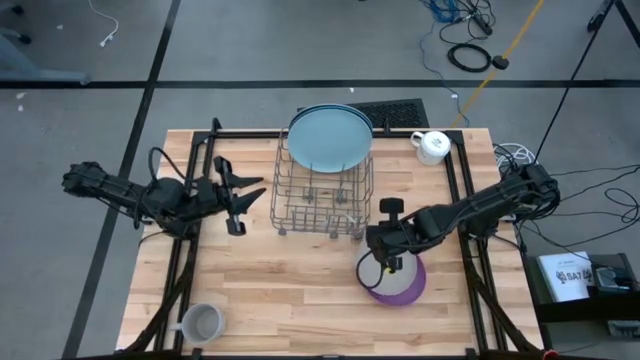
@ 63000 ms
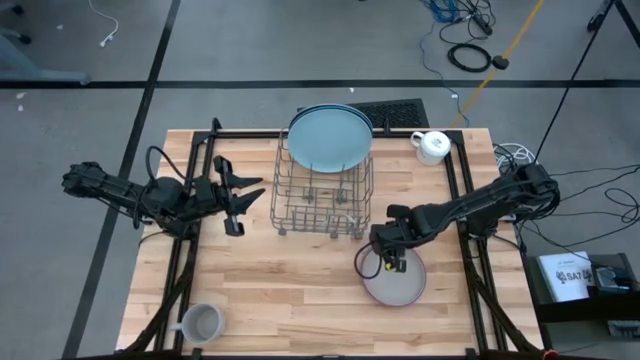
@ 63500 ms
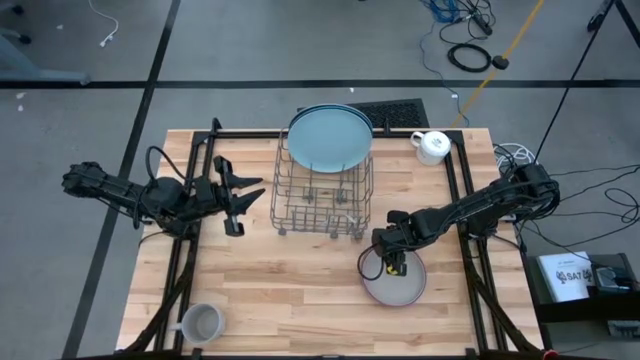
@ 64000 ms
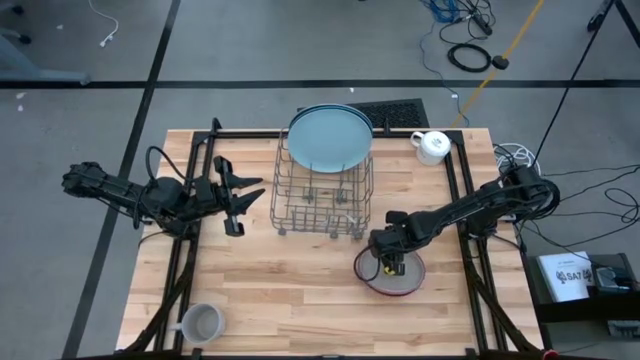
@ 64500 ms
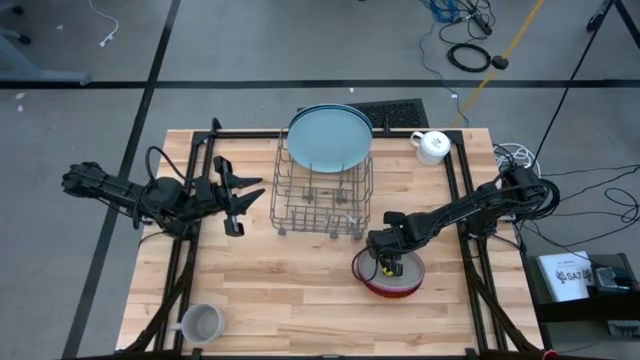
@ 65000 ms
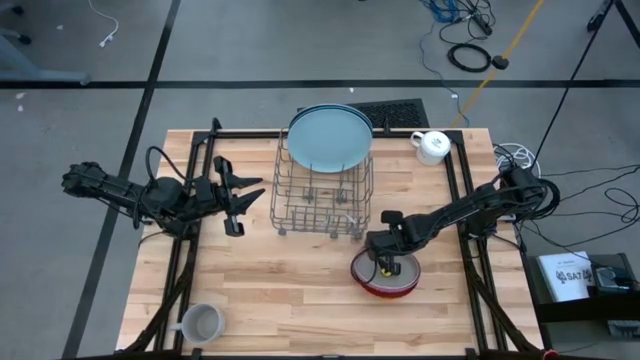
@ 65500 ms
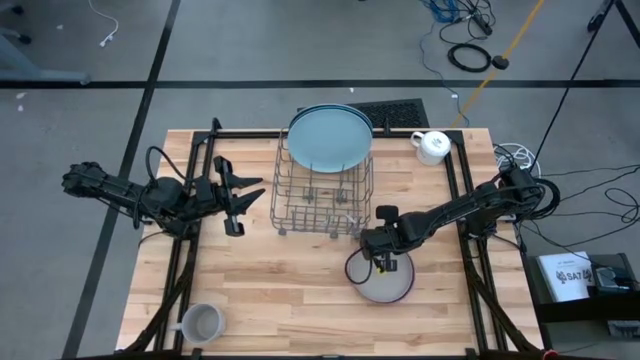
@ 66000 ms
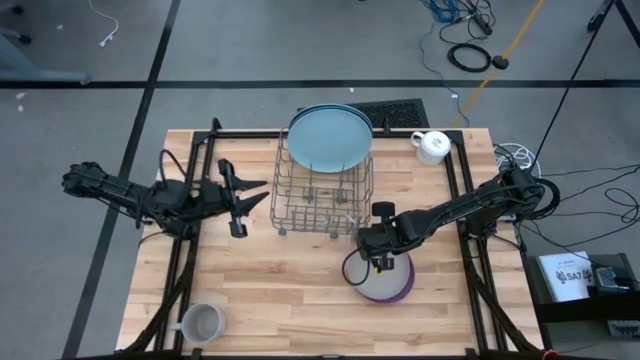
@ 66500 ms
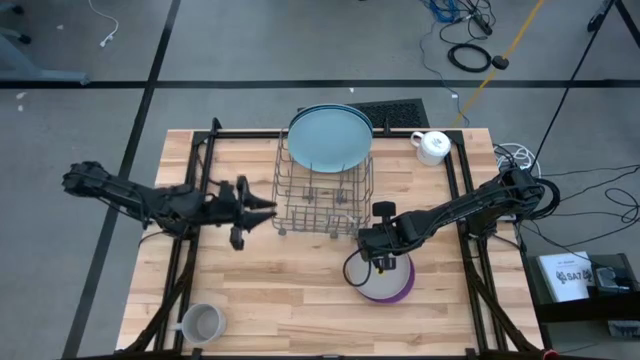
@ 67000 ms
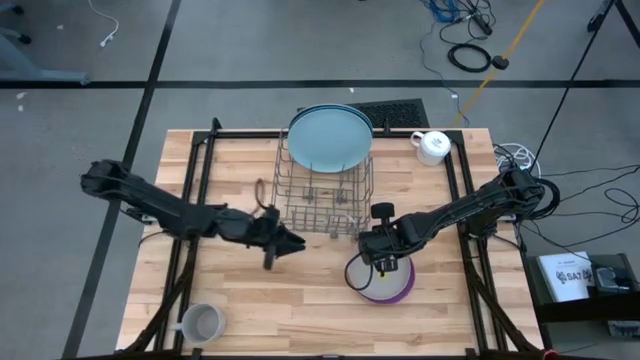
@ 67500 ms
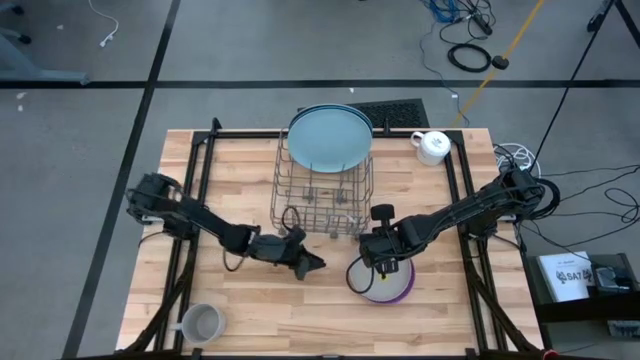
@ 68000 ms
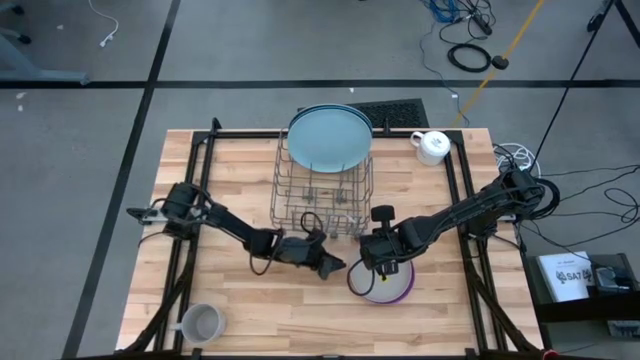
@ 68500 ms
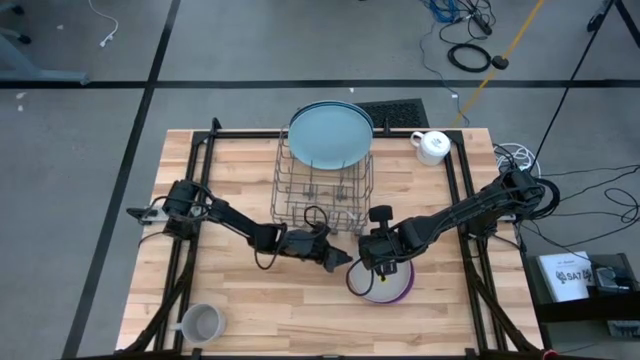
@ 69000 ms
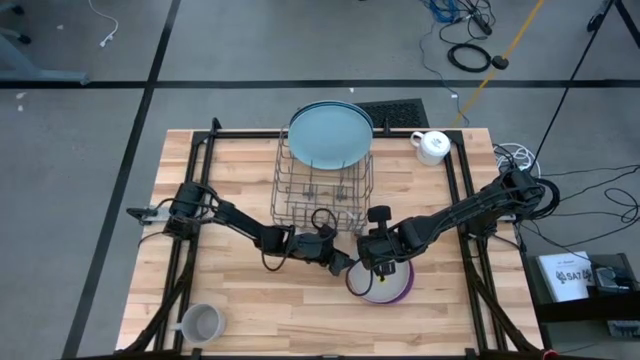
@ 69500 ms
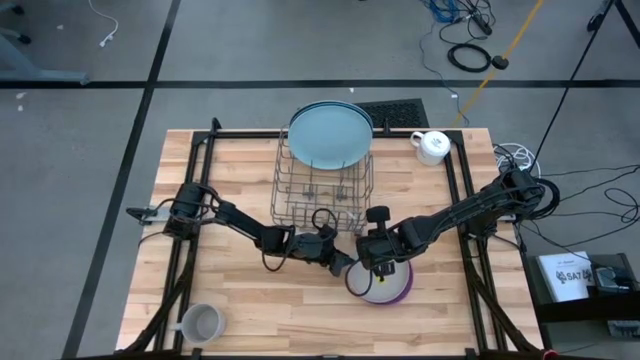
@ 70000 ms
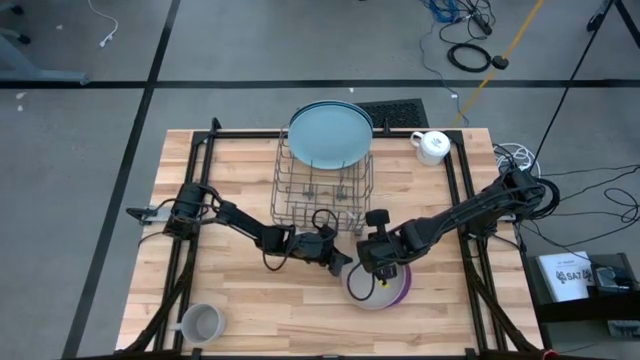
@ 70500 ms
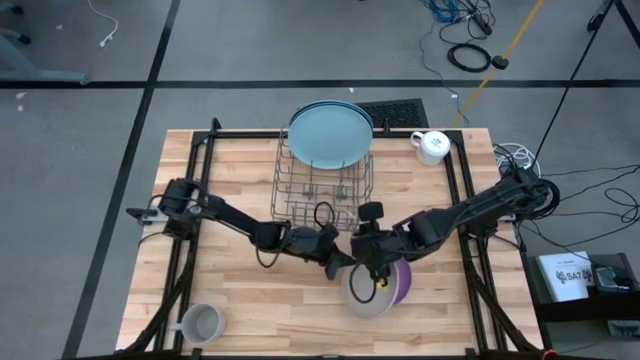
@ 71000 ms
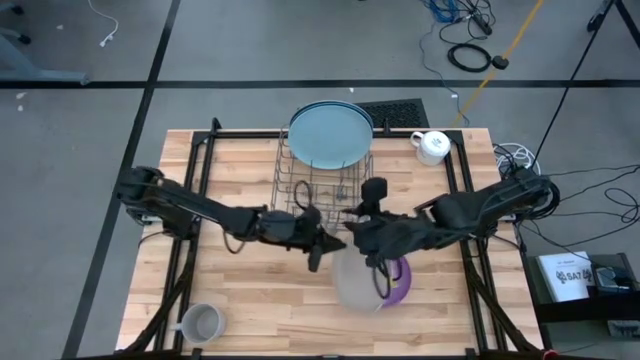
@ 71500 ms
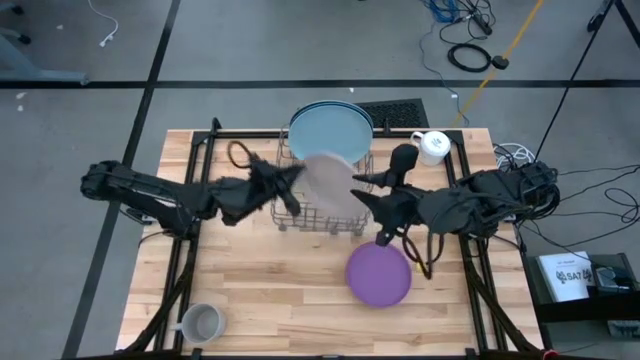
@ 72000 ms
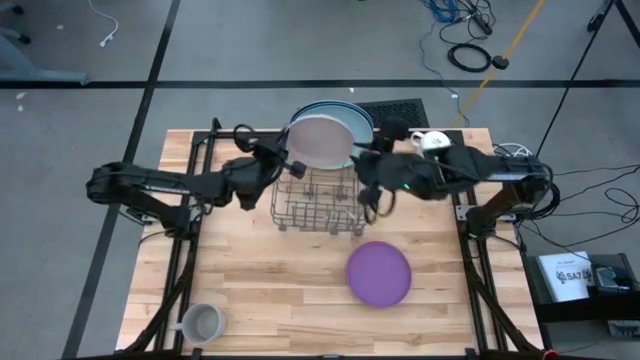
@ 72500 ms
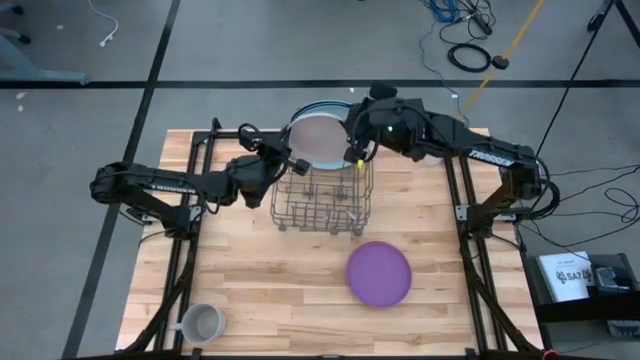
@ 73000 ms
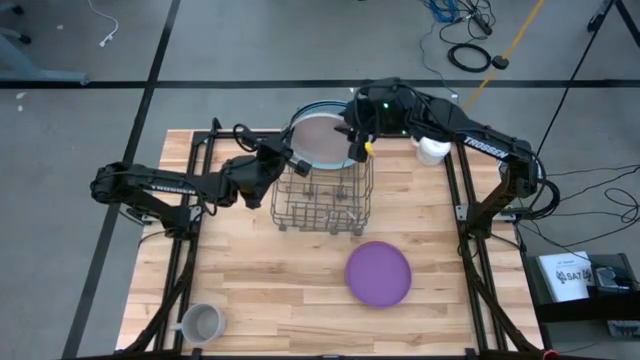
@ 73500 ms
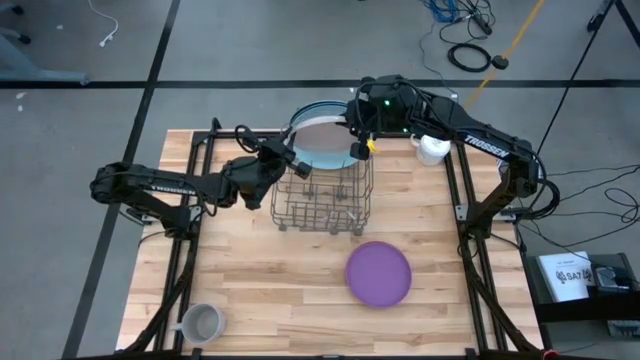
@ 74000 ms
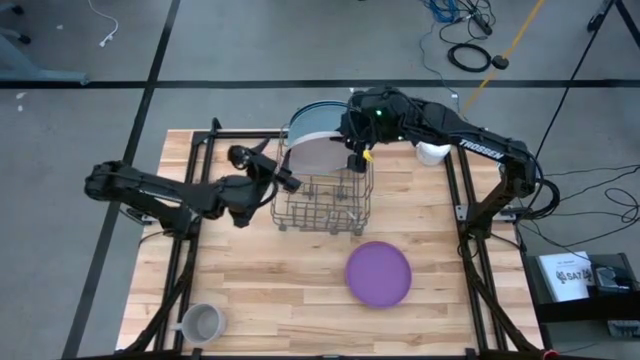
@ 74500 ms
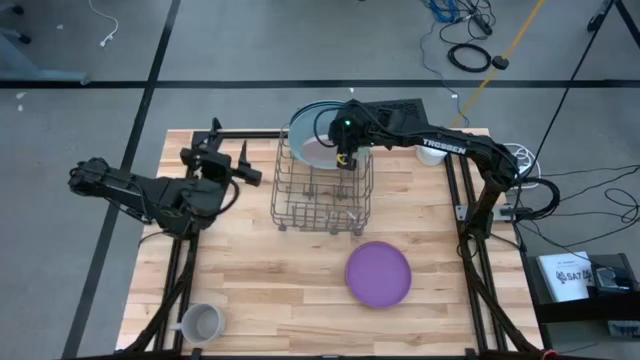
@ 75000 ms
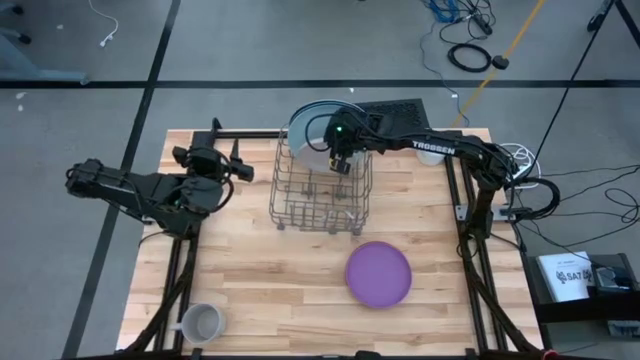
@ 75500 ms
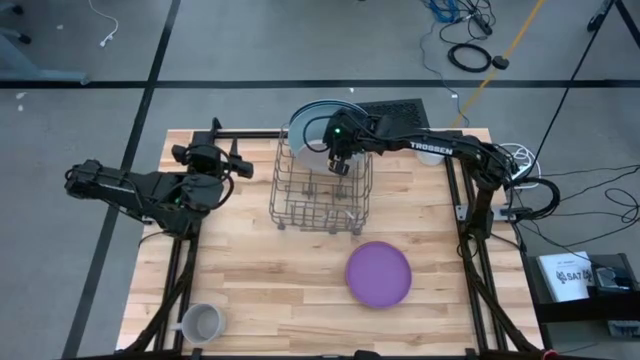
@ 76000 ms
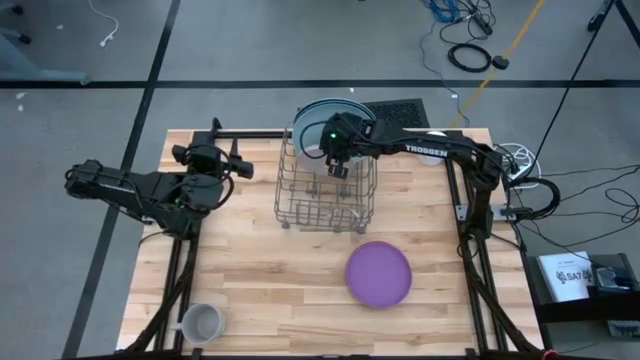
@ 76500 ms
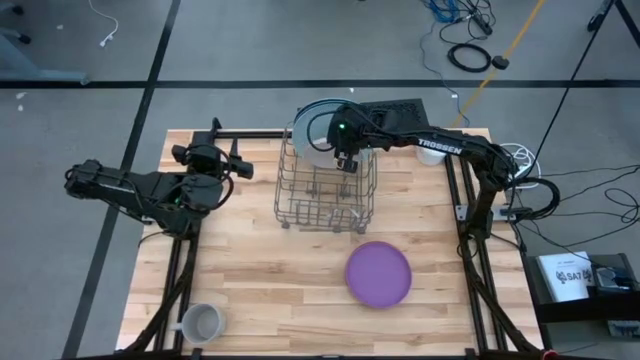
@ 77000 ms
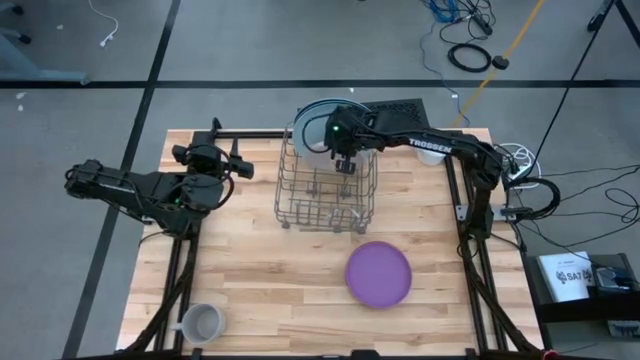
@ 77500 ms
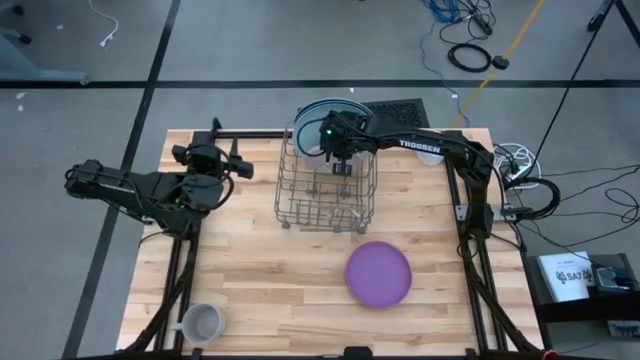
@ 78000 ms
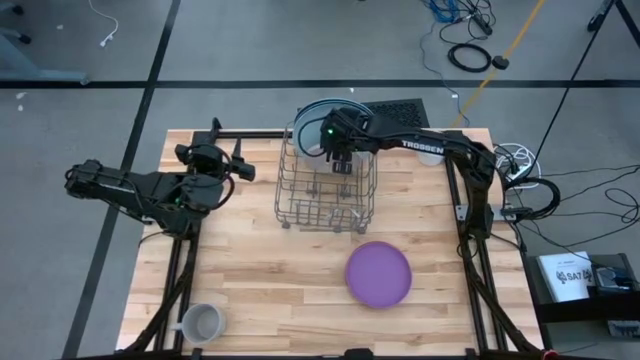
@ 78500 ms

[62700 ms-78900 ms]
Task: Sort dishes
Put the small gray plate into the dish rack

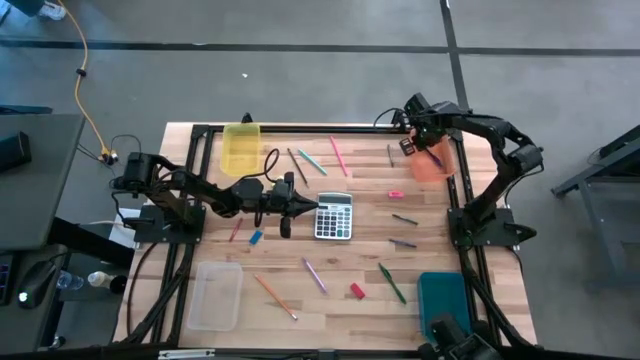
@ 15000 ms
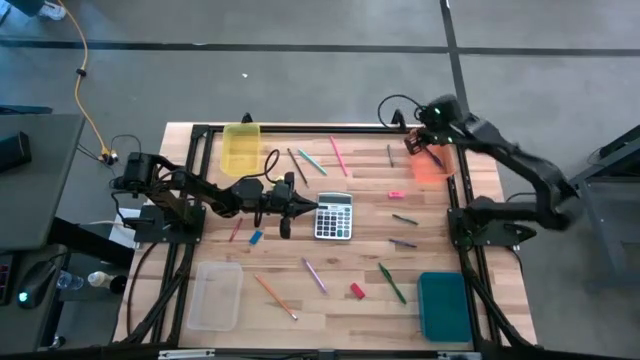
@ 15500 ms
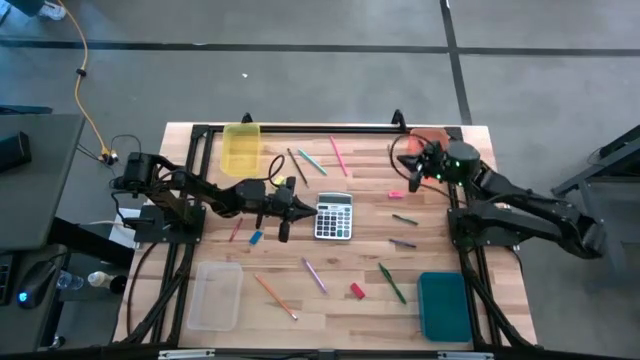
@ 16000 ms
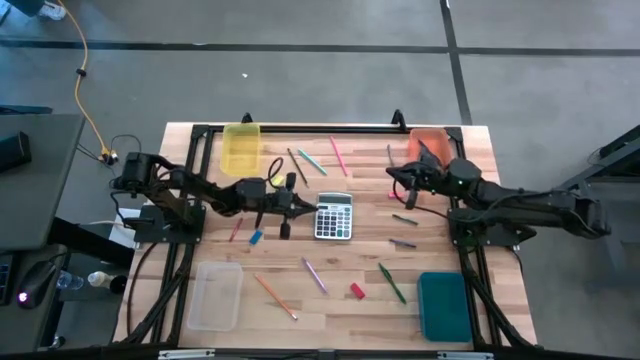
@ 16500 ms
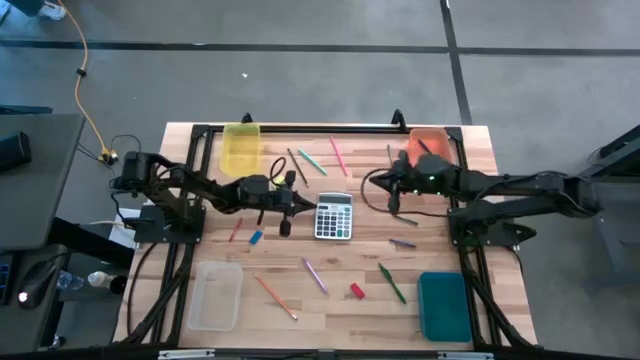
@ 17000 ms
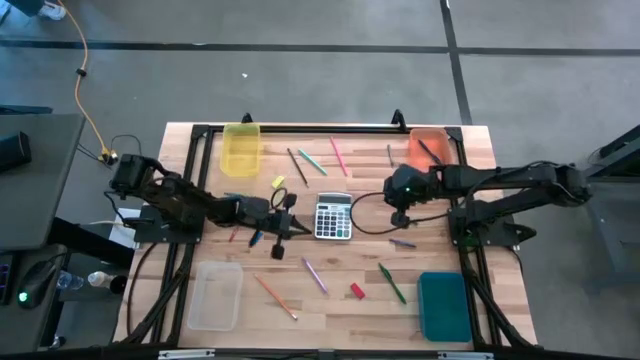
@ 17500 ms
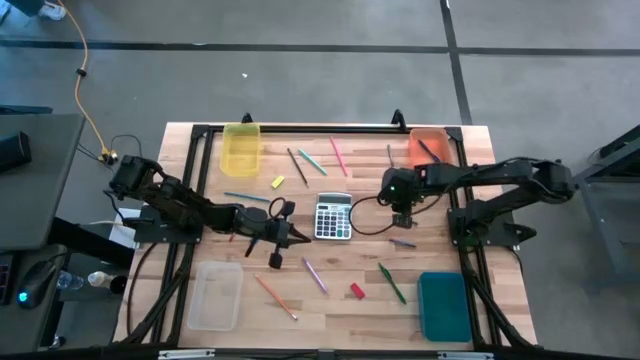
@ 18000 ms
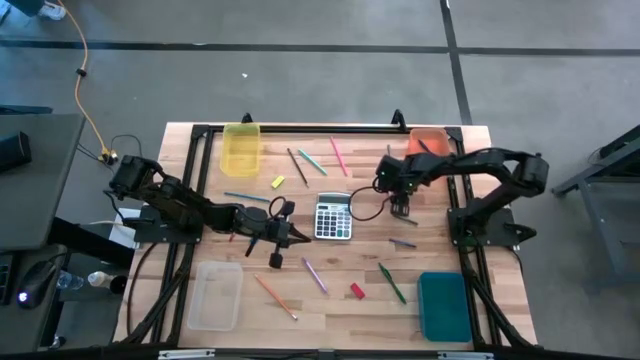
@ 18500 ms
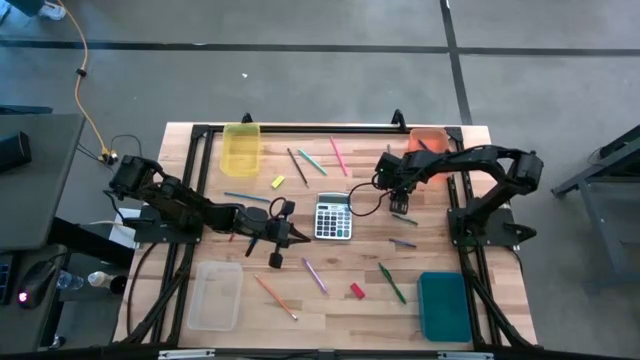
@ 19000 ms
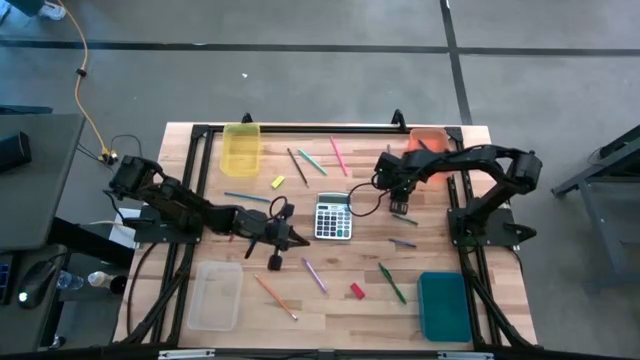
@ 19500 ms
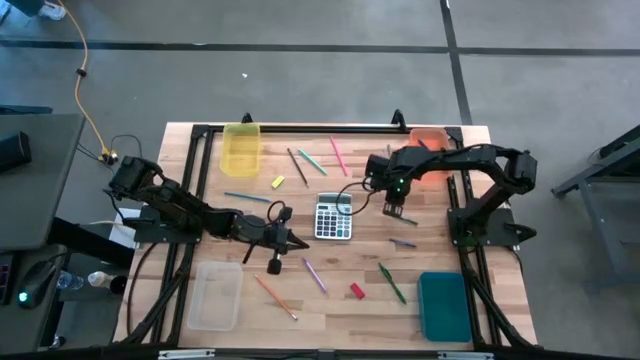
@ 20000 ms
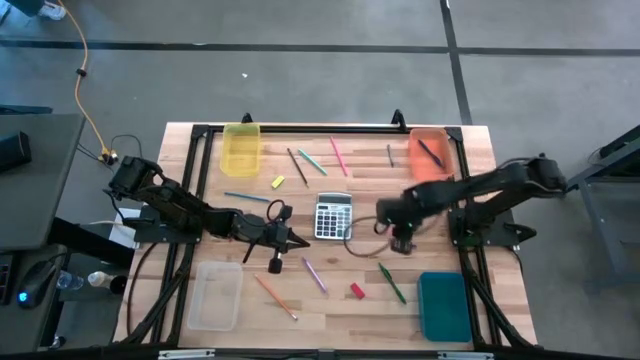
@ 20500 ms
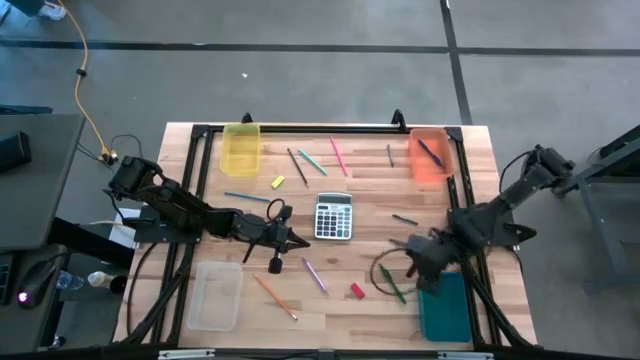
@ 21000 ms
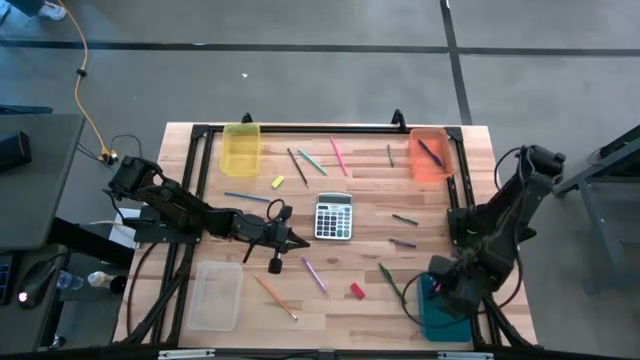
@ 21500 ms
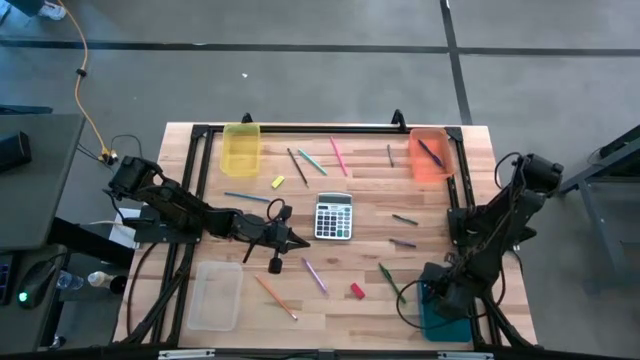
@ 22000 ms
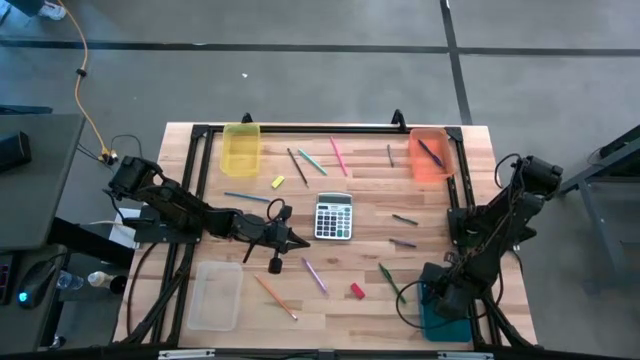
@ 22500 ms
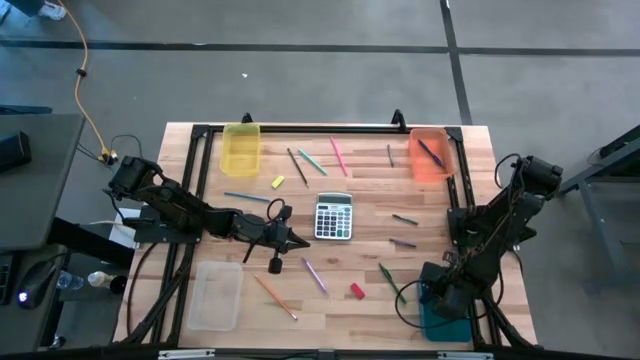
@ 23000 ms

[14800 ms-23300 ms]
Task: Sort crayons/erasers/pens/pencils in bins
Put the pink eraser into the blue bin
